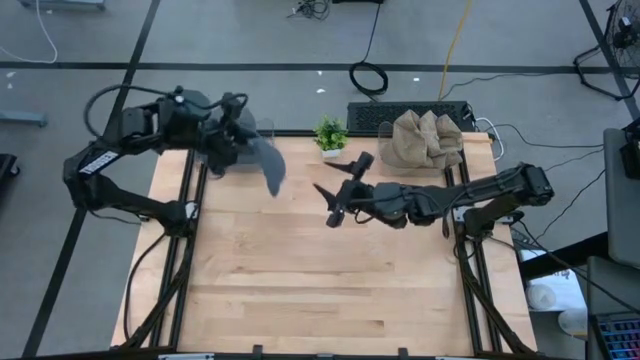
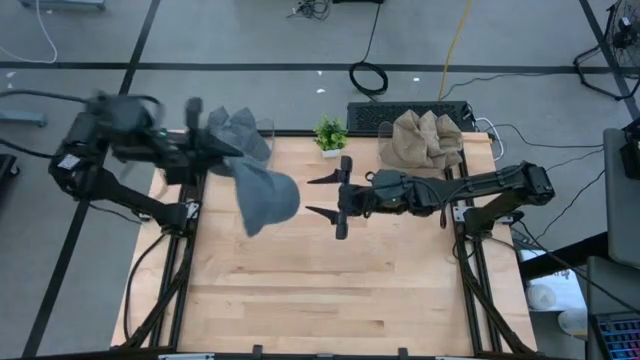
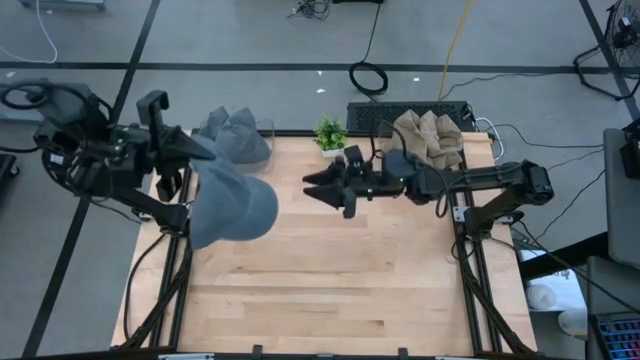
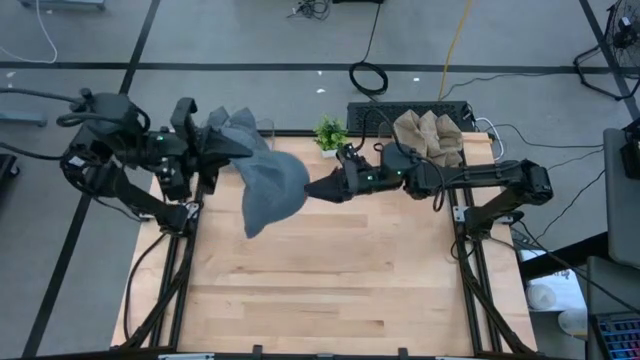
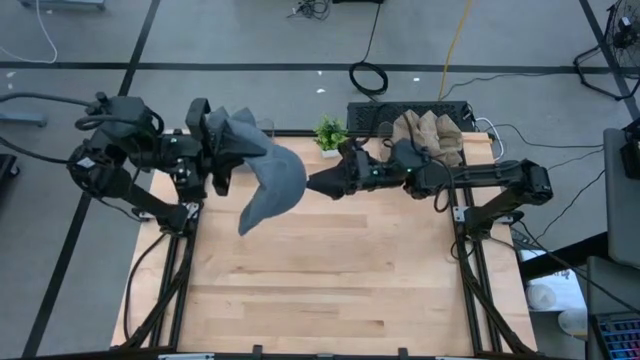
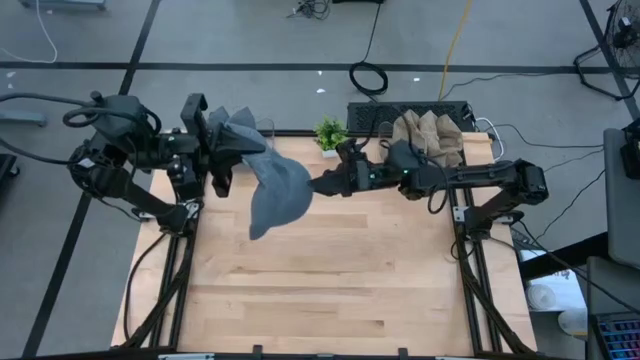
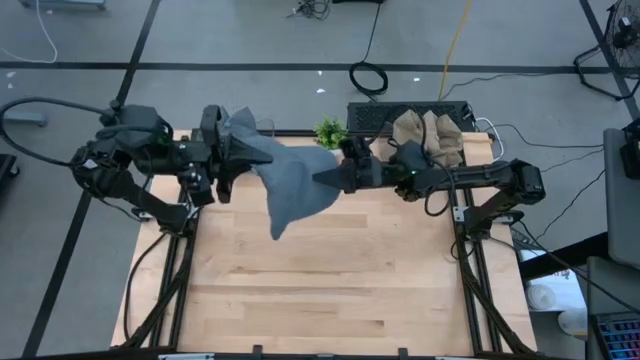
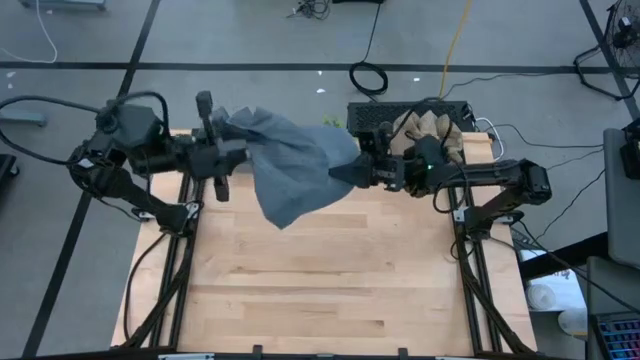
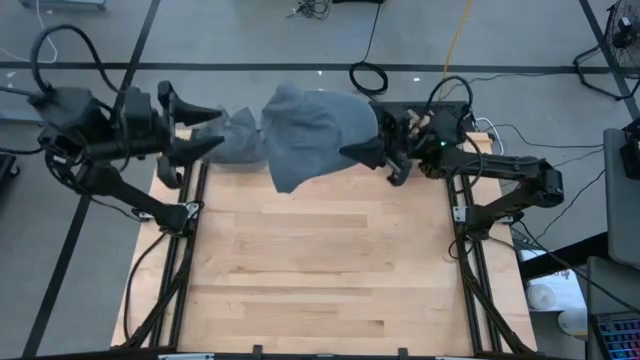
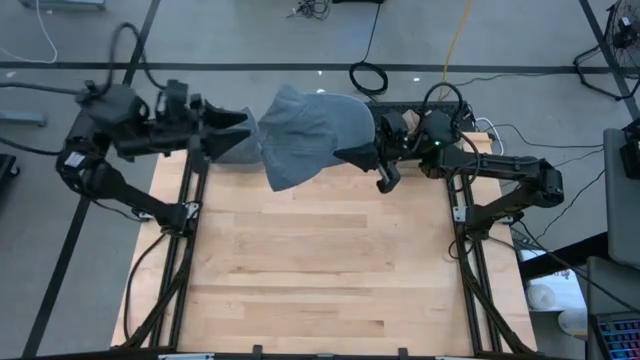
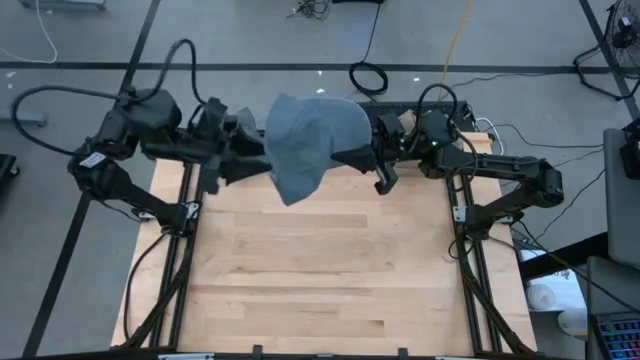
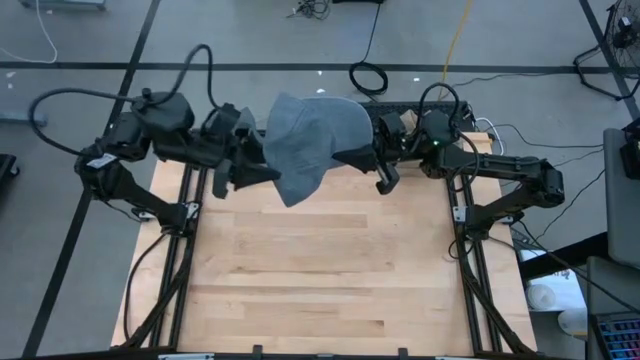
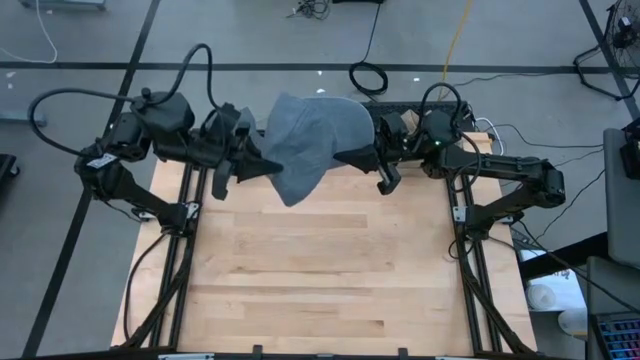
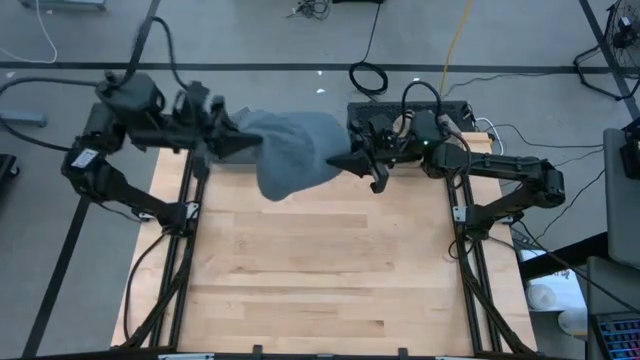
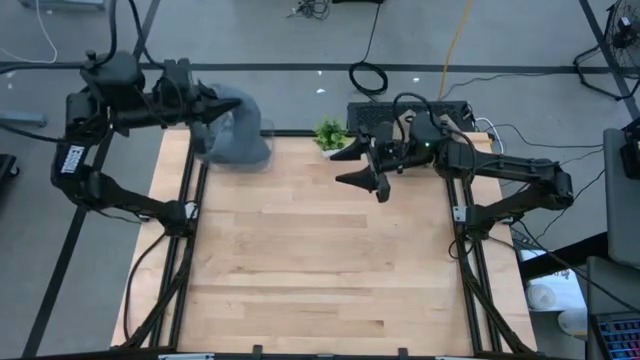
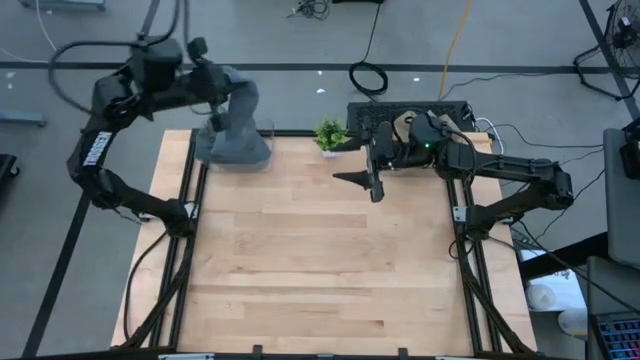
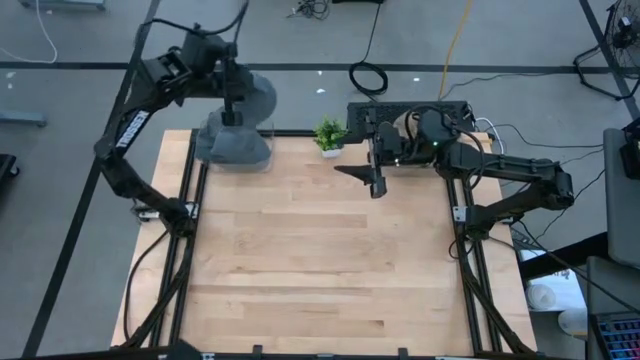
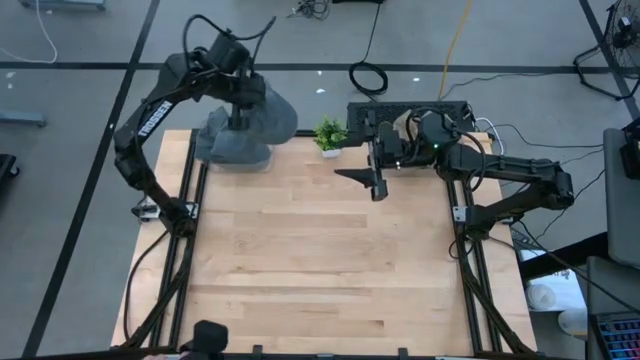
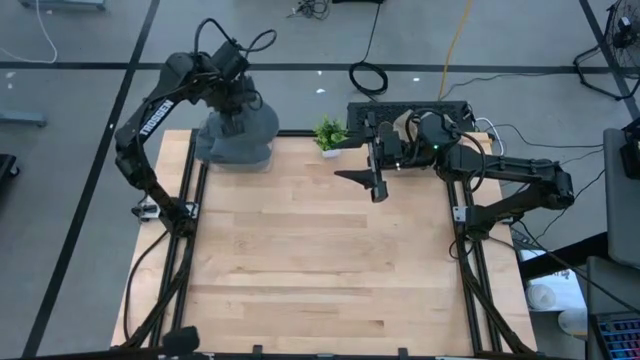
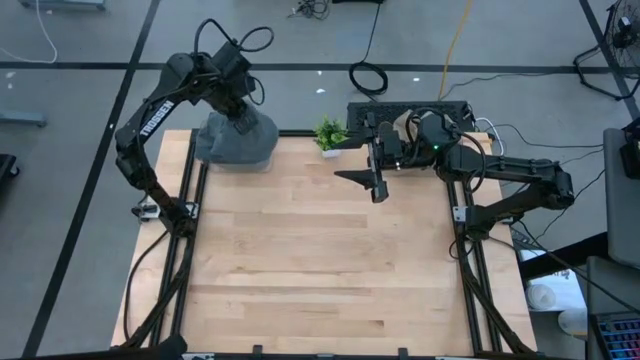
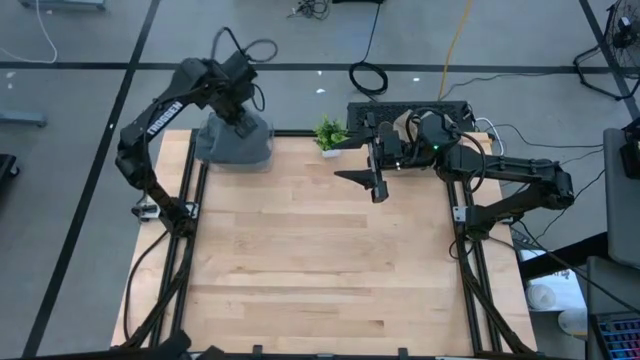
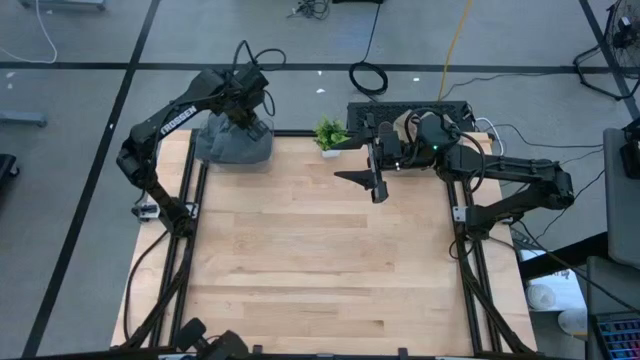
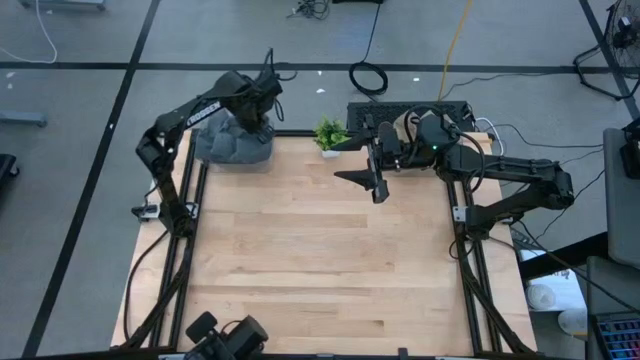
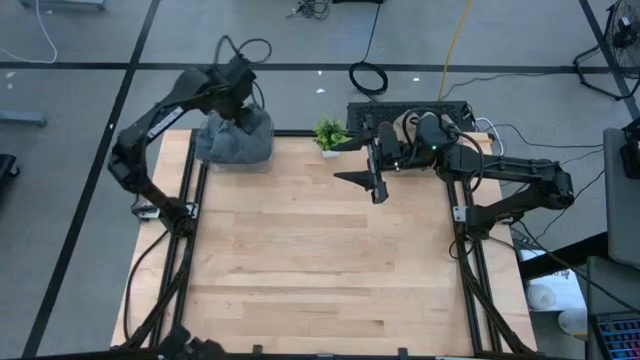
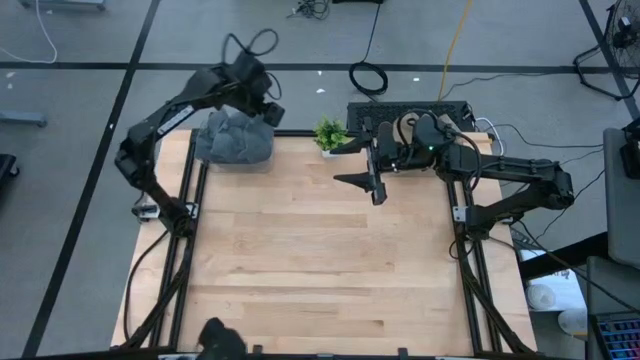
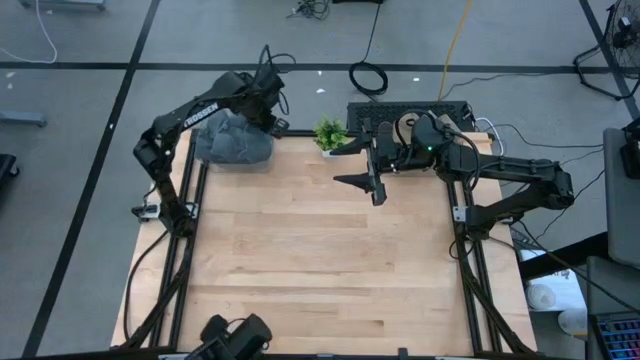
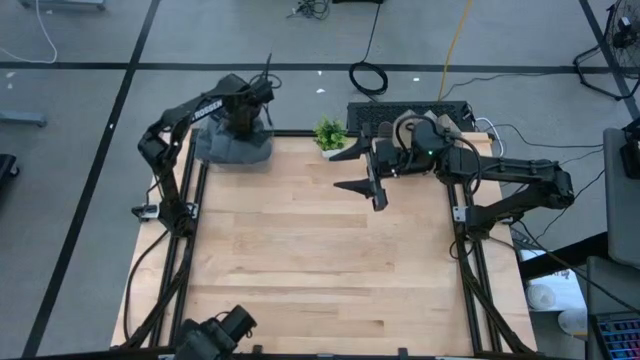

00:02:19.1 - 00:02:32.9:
Task: Pick & Place hat
Put the blue cap into the left transparent bin

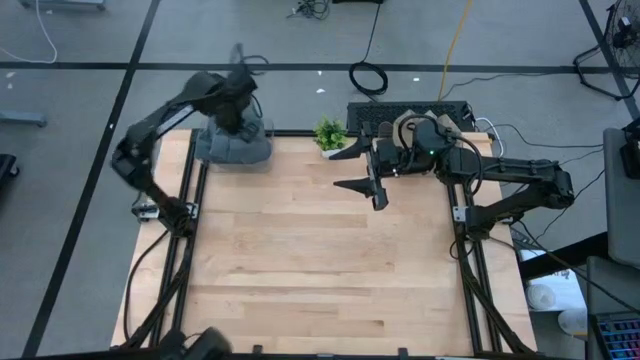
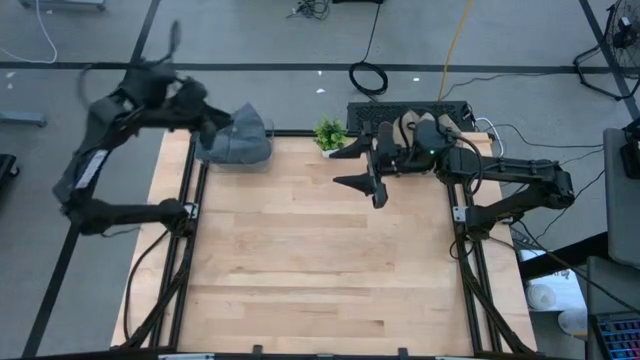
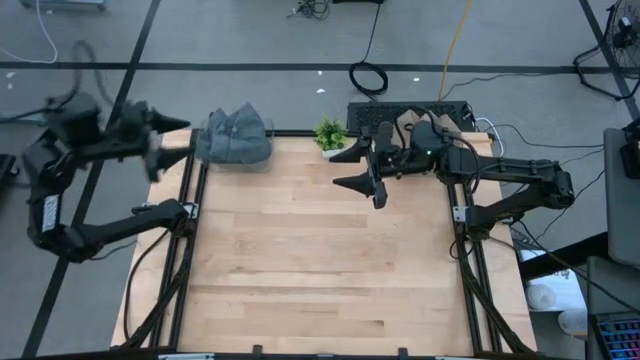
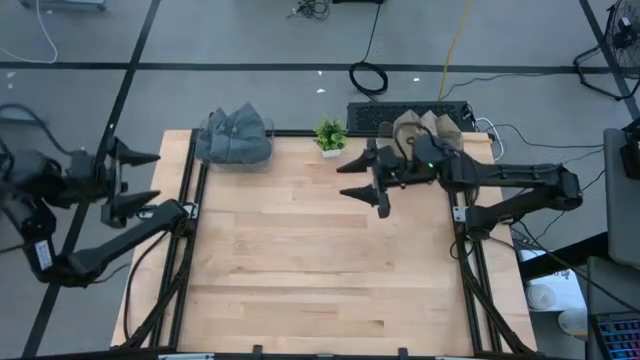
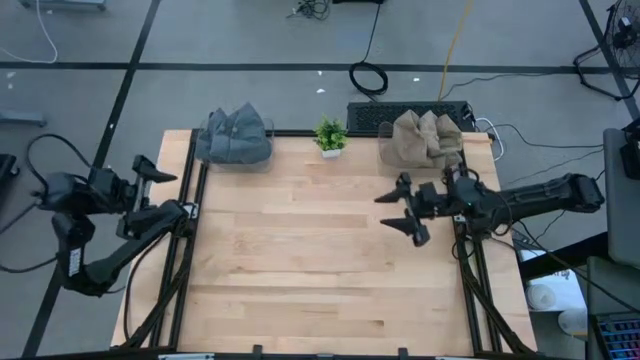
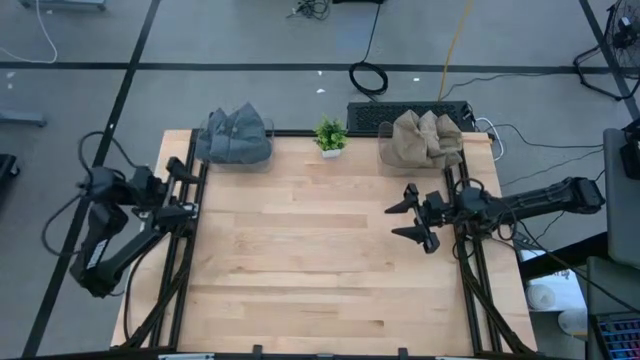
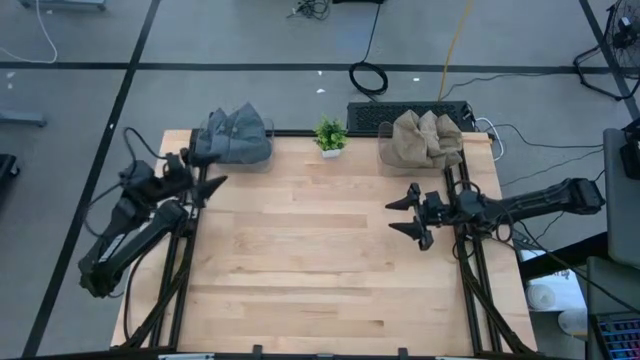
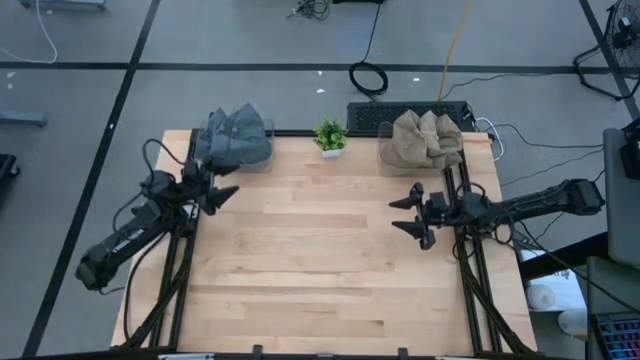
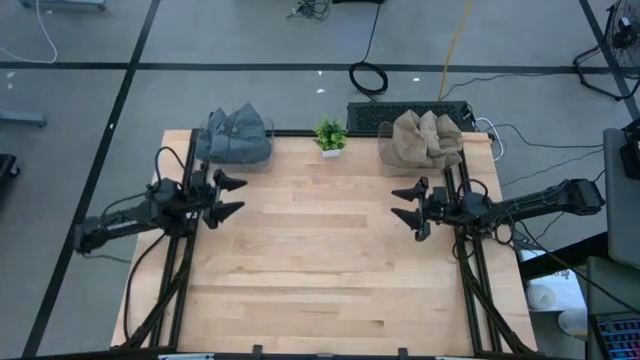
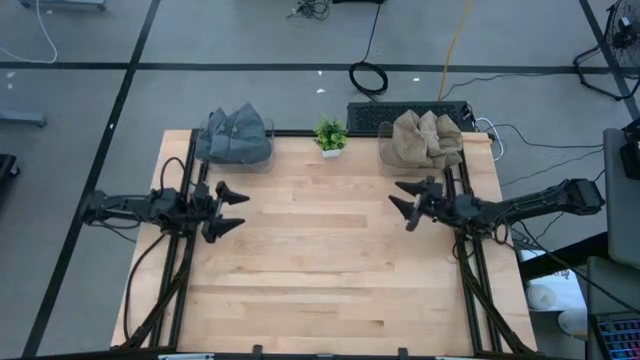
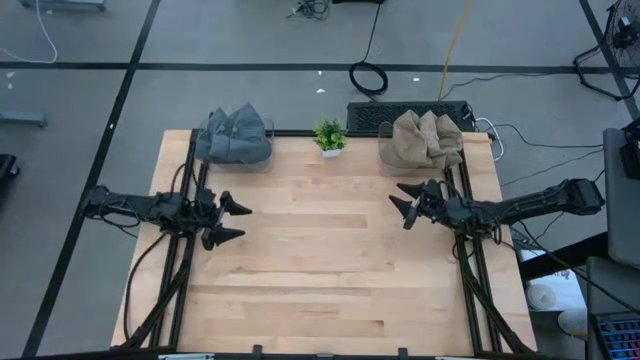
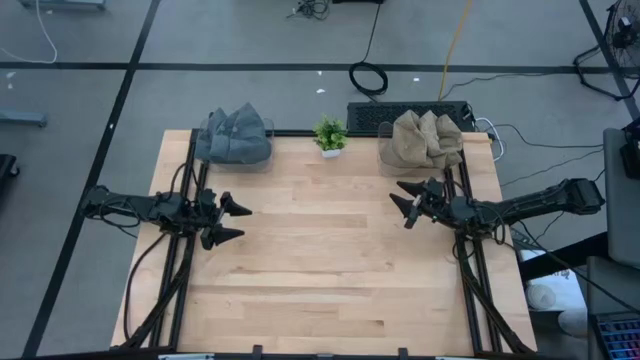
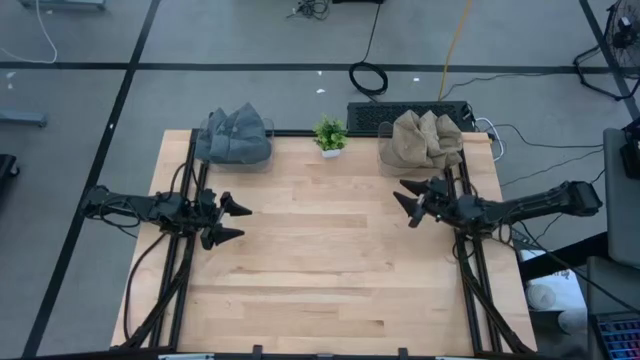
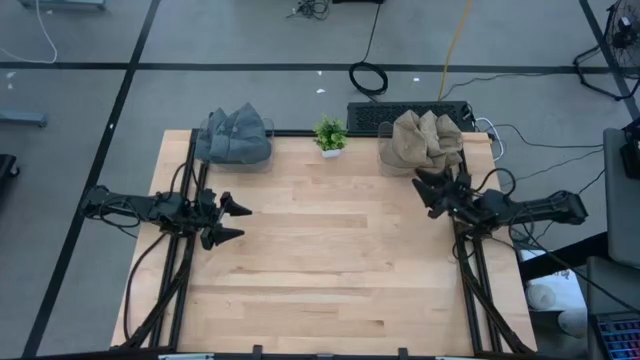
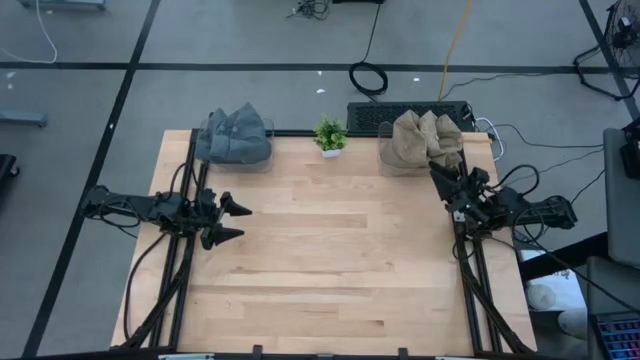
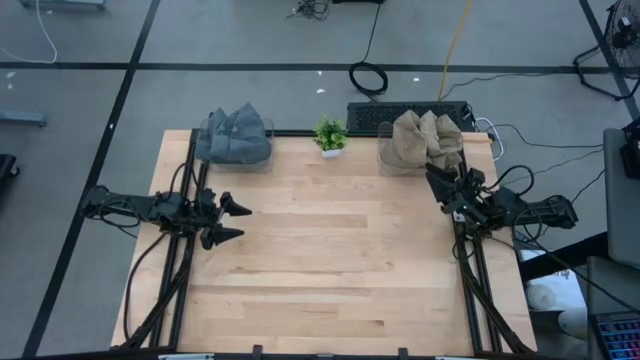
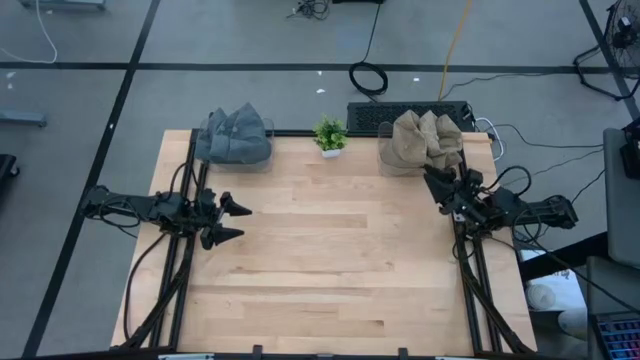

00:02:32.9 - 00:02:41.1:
Return to Home Position
